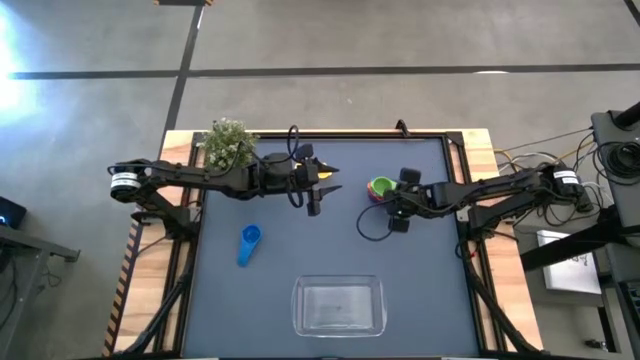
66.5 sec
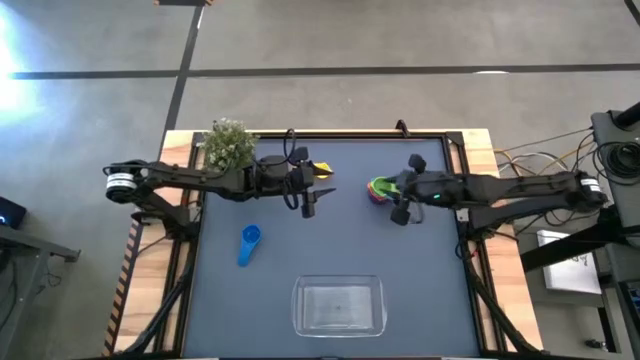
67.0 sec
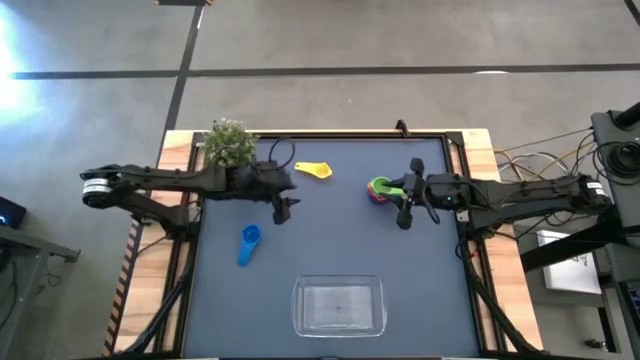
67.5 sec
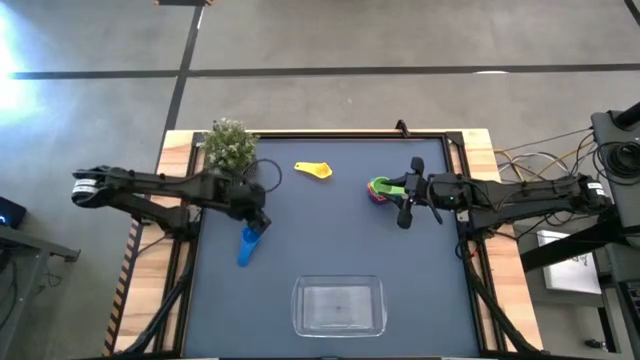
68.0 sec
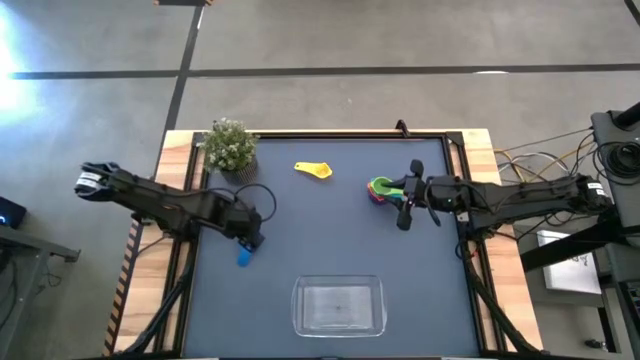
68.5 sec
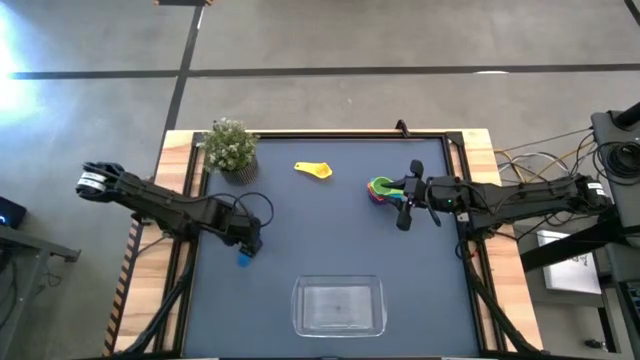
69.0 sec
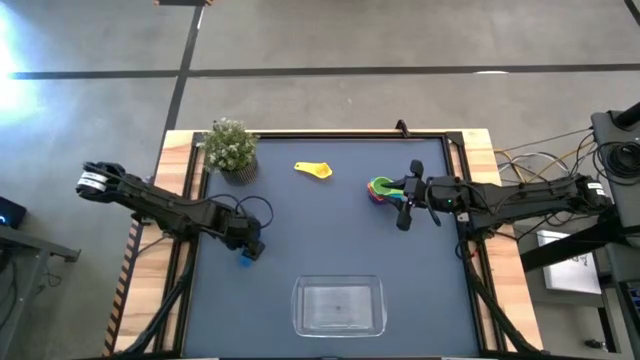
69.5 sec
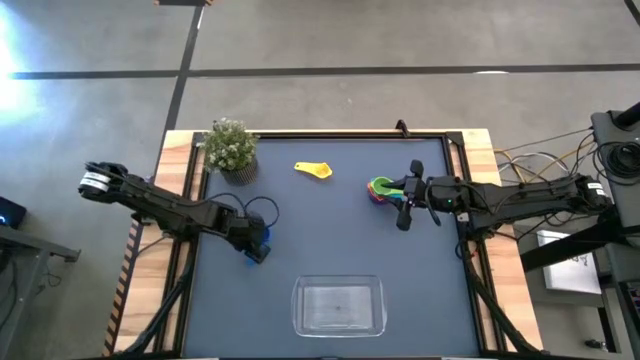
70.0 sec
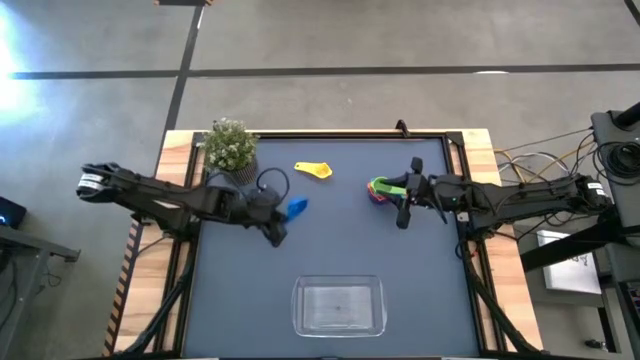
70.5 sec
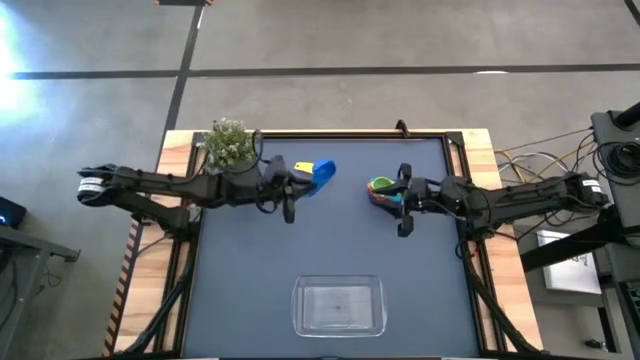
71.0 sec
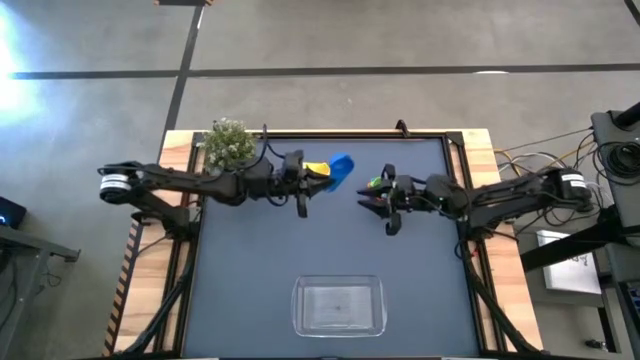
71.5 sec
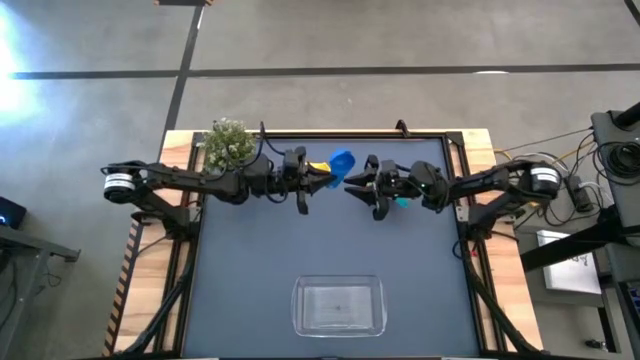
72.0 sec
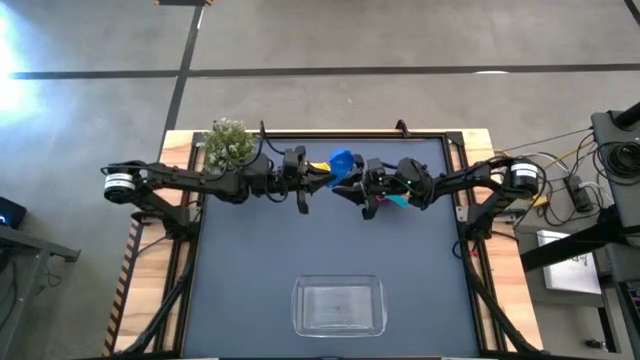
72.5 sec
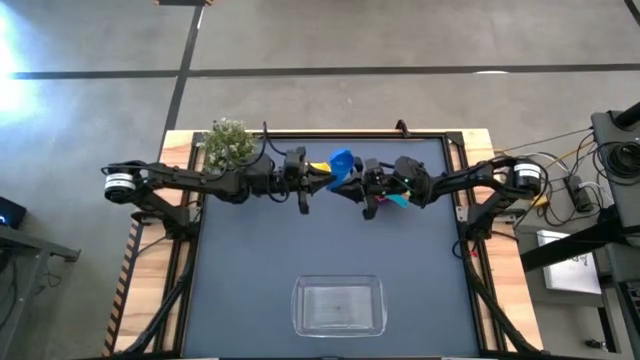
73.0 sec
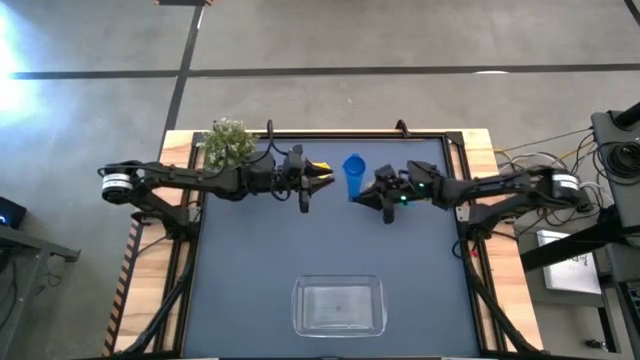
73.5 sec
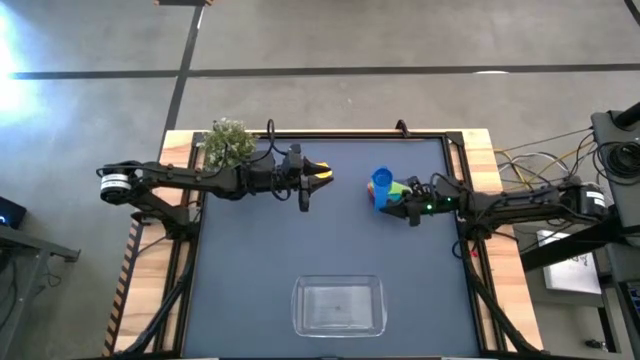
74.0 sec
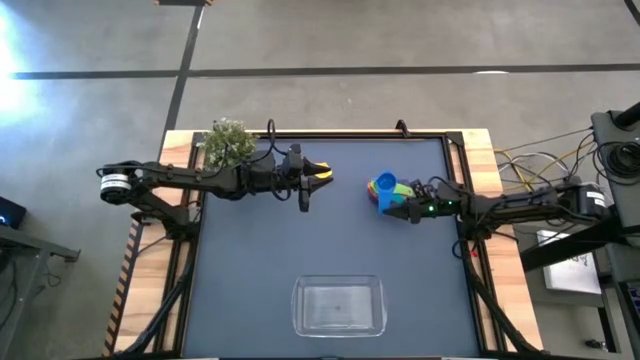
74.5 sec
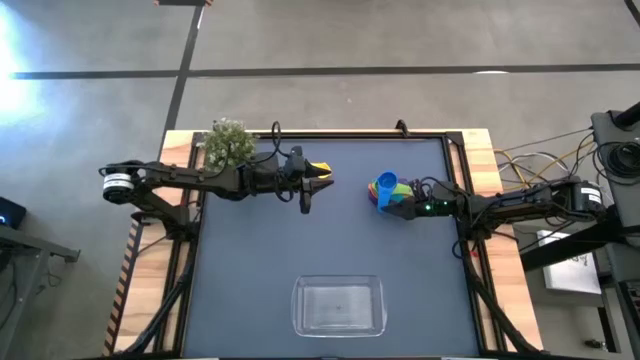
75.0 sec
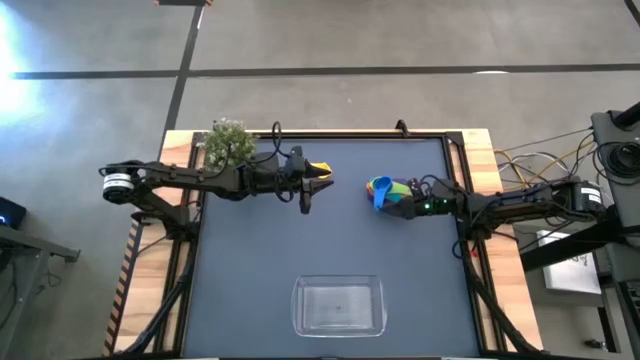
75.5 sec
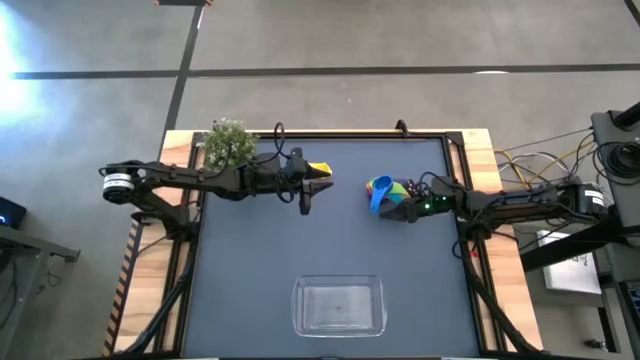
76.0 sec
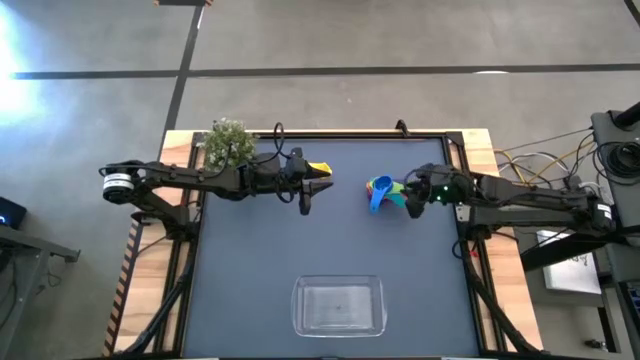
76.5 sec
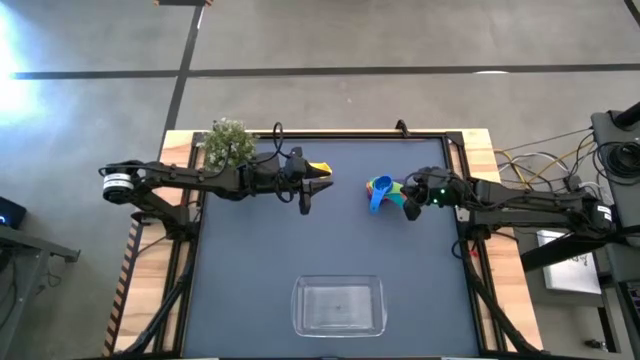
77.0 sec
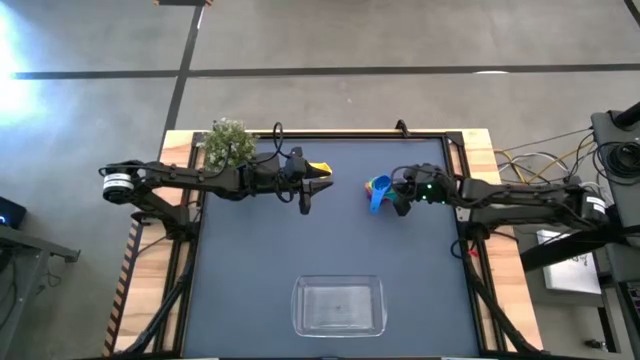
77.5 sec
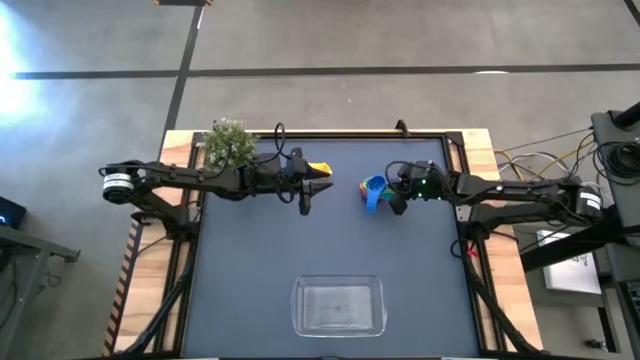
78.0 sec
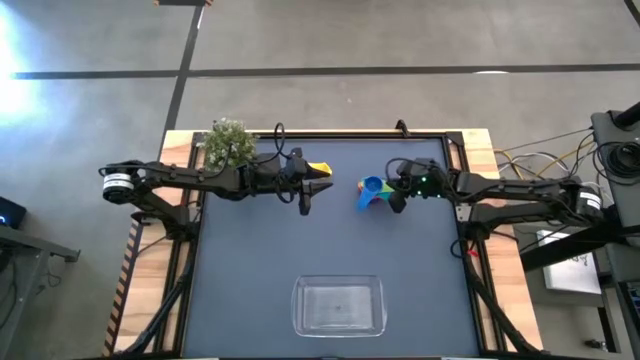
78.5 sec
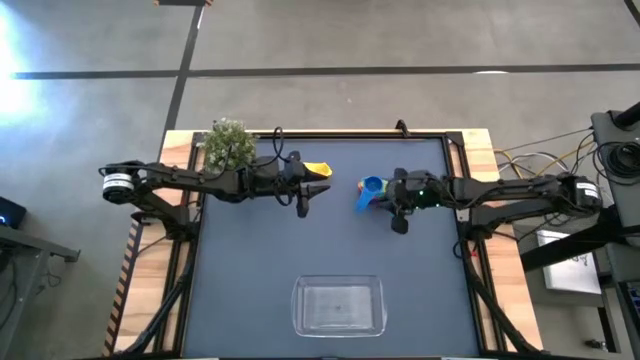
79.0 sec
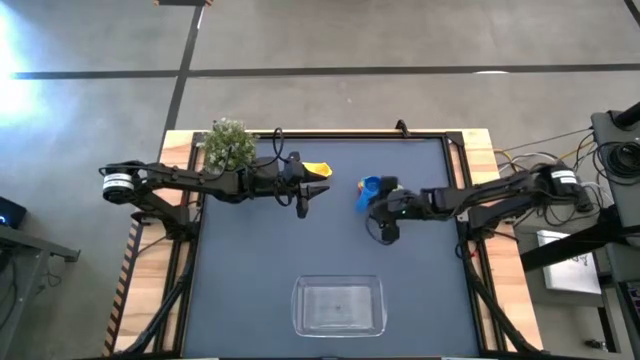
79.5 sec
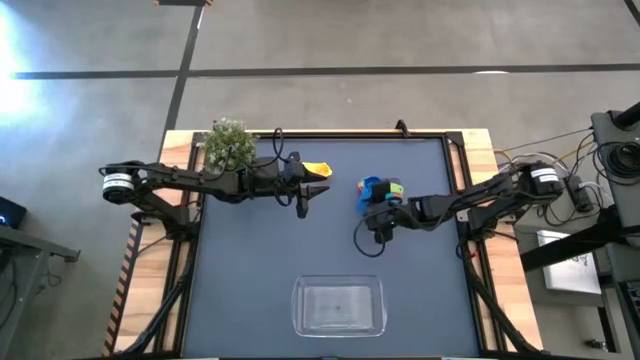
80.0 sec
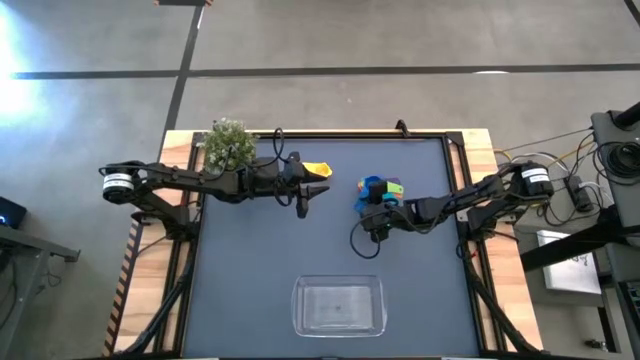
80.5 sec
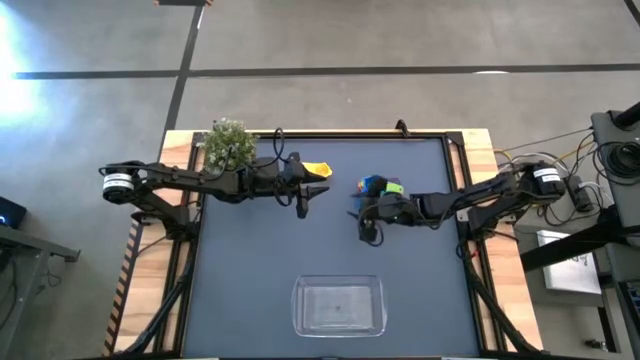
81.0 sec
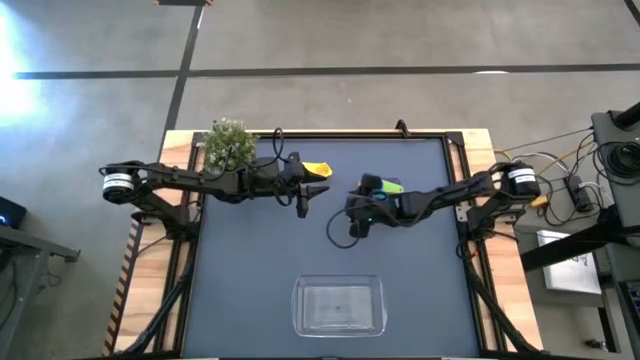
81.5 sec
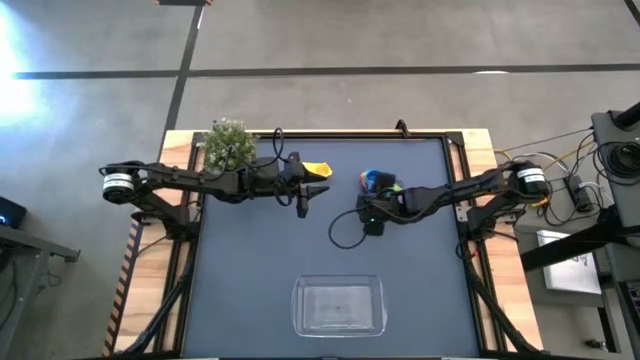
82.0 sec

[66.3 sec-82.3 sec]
Task: Nest measuring cups in basket
Stack the blue measuring cup on the green measuring cup

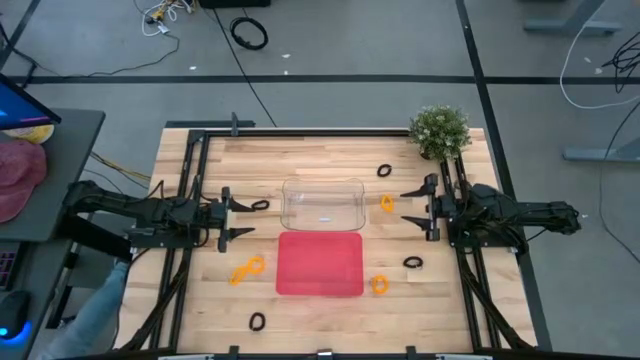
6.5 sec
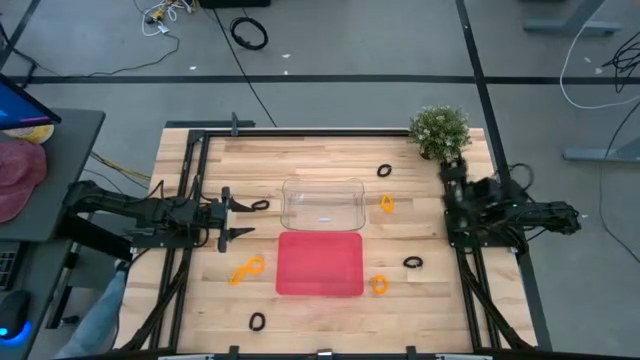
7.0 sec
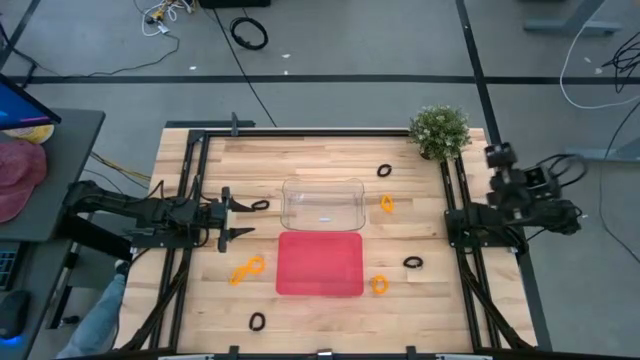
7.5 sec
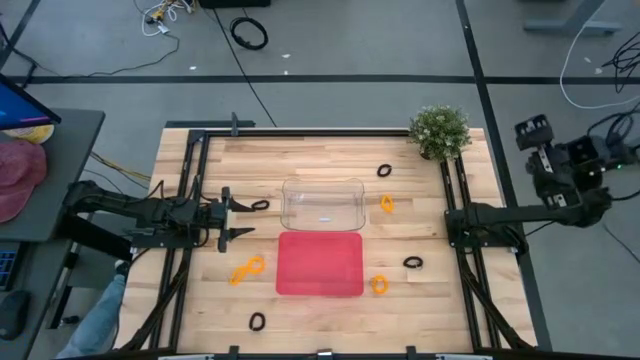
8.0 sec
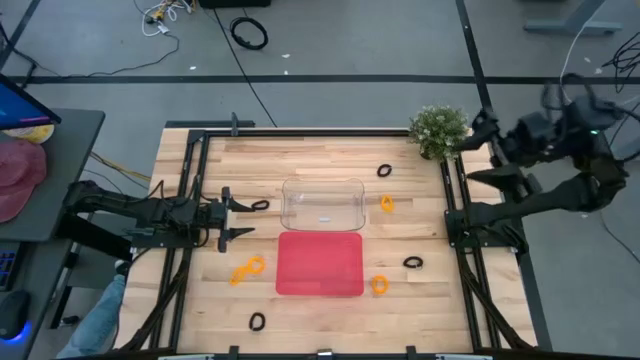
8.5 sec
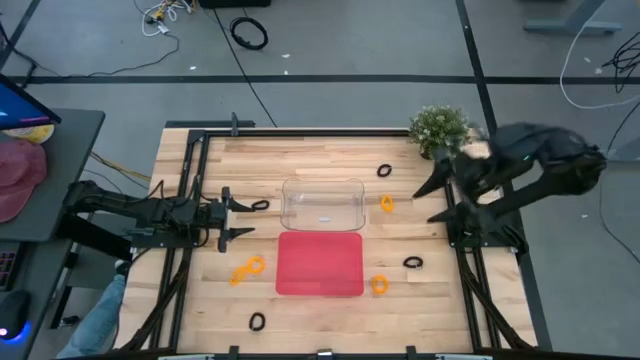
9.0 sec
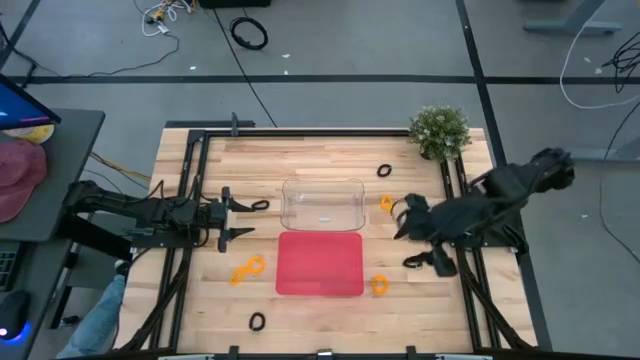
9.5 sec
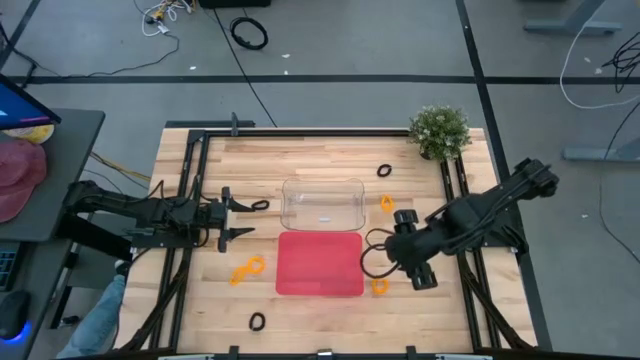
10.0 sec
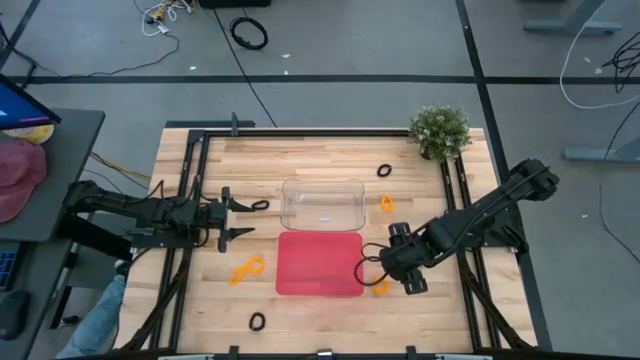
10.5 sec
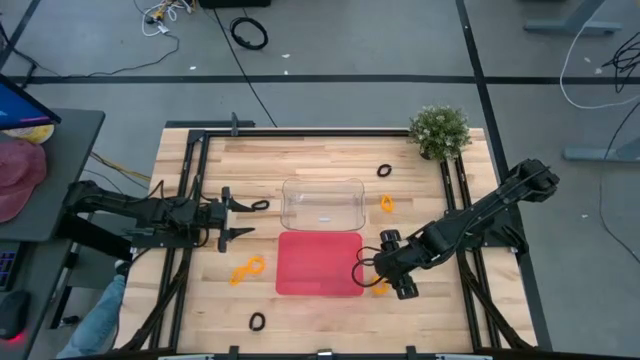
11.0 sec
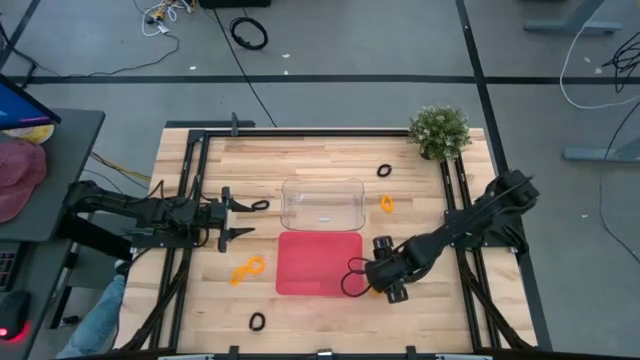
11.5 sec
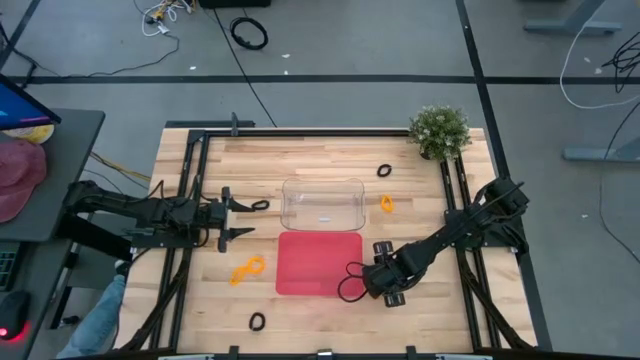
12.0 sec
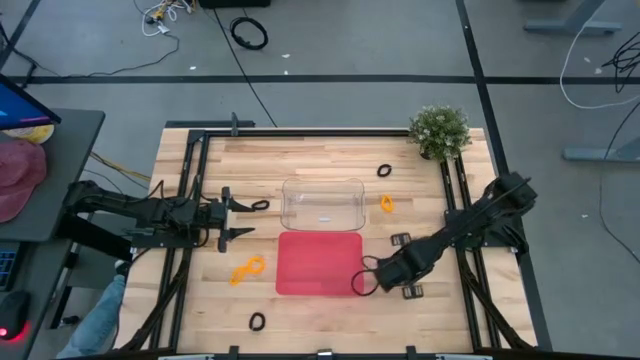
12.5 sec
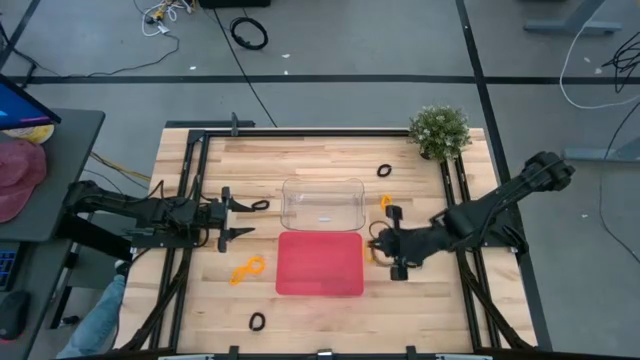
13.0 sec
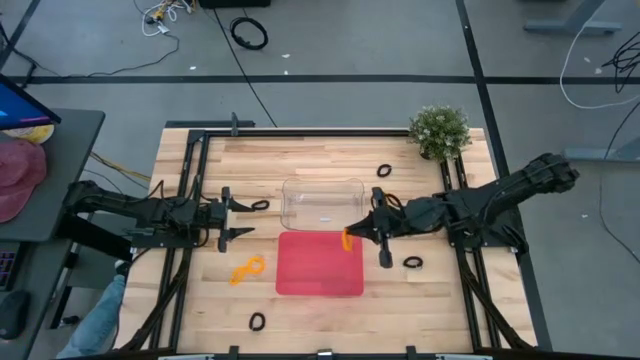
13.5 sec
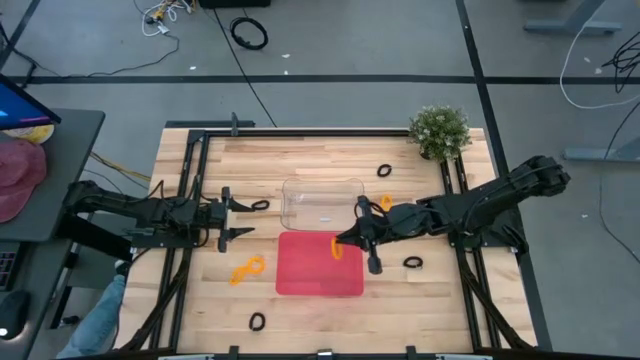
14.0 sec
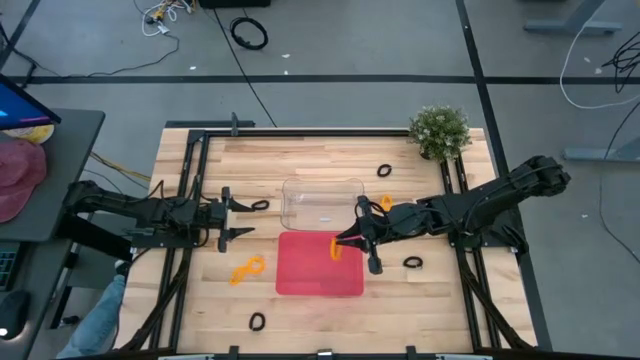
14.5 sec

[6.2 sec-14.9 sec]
Task: Sort spring keychains
Put the orange spring keychain into the pink bin
